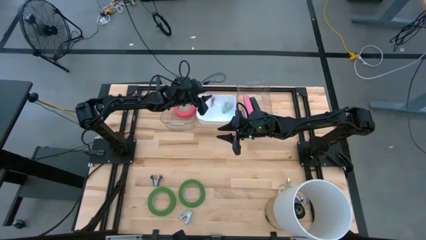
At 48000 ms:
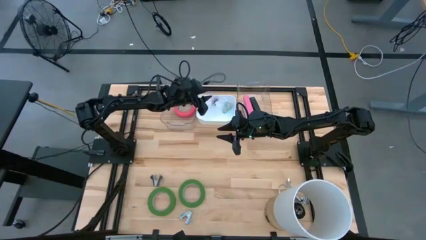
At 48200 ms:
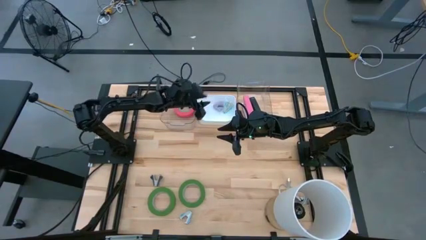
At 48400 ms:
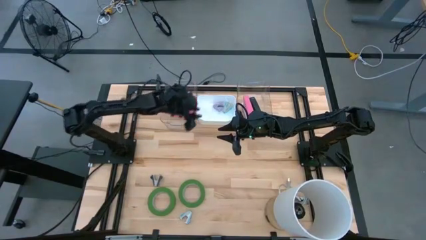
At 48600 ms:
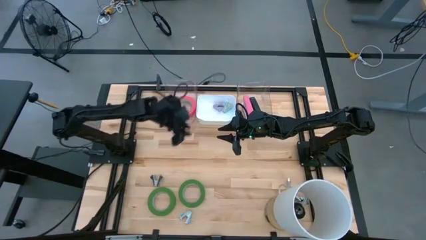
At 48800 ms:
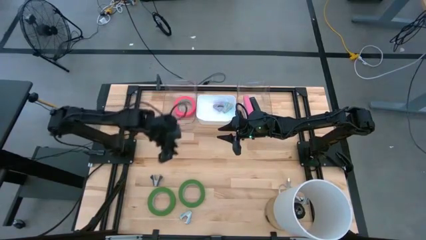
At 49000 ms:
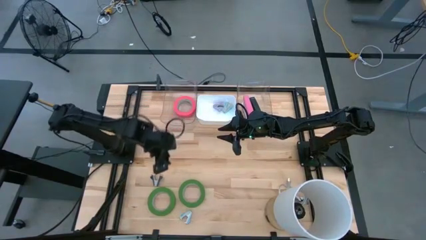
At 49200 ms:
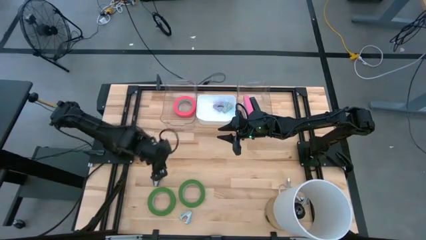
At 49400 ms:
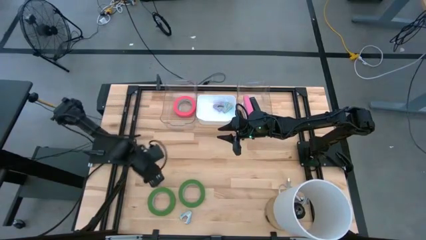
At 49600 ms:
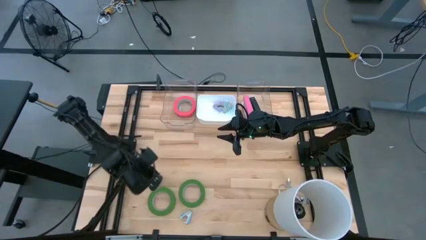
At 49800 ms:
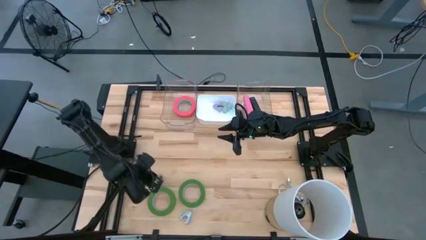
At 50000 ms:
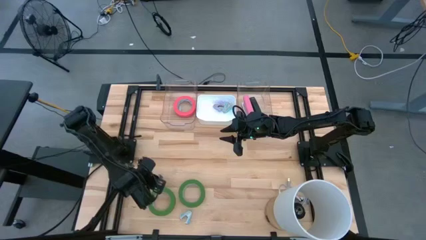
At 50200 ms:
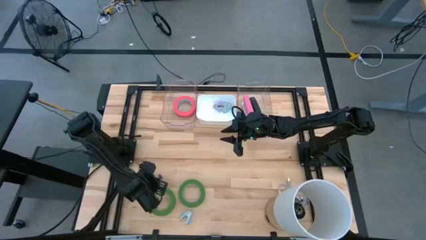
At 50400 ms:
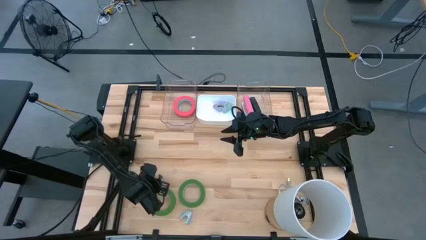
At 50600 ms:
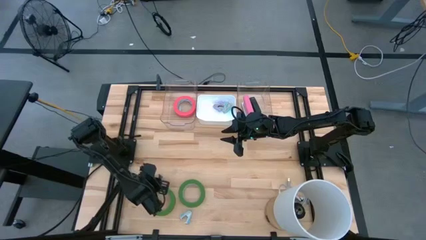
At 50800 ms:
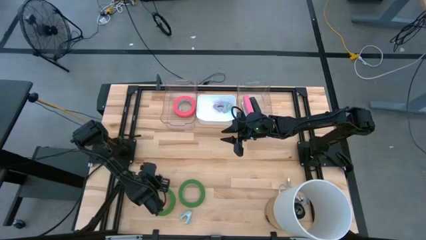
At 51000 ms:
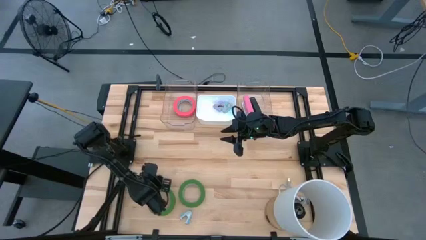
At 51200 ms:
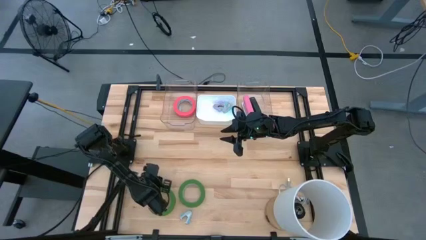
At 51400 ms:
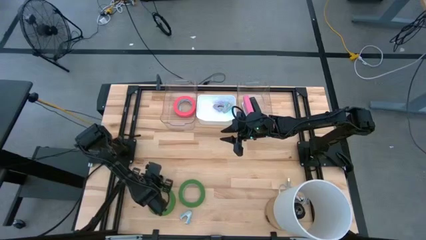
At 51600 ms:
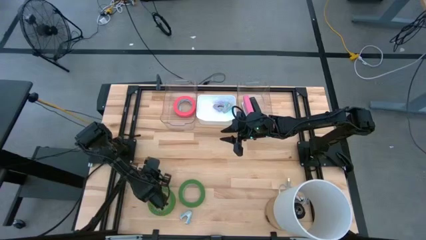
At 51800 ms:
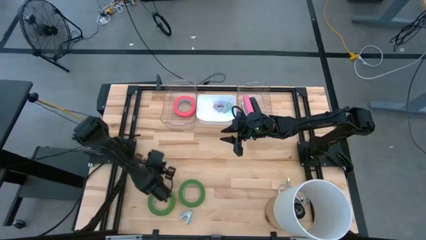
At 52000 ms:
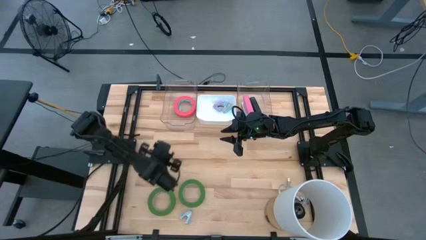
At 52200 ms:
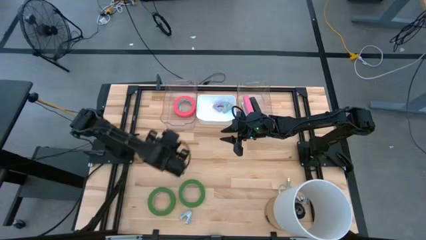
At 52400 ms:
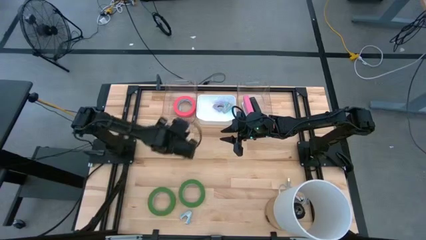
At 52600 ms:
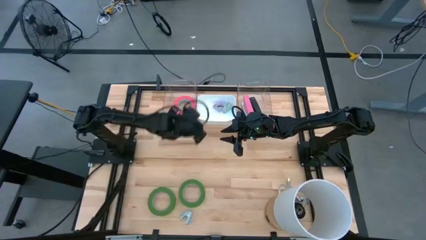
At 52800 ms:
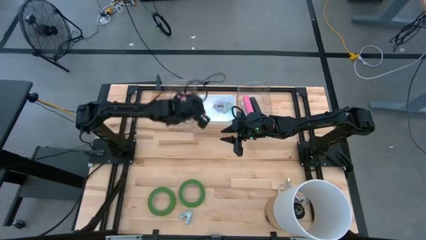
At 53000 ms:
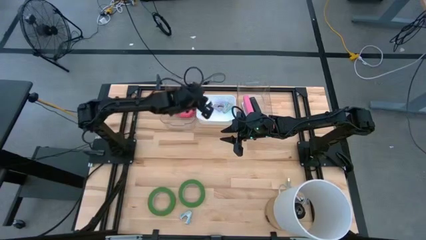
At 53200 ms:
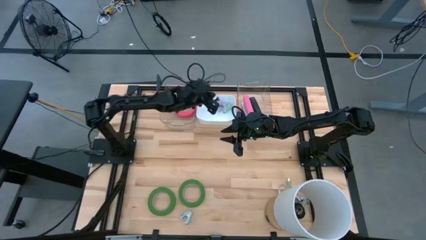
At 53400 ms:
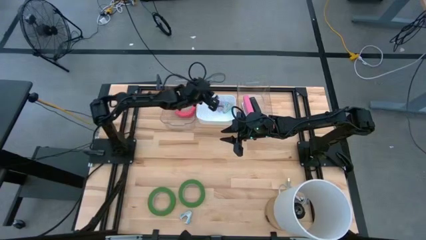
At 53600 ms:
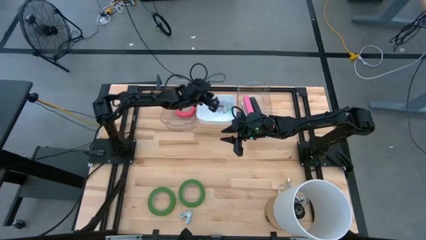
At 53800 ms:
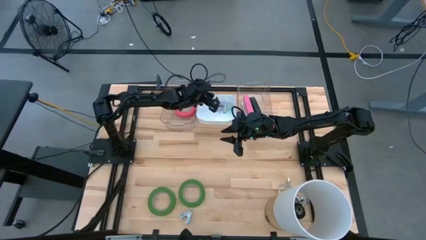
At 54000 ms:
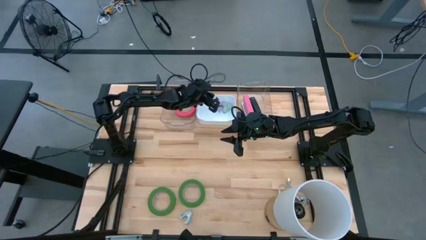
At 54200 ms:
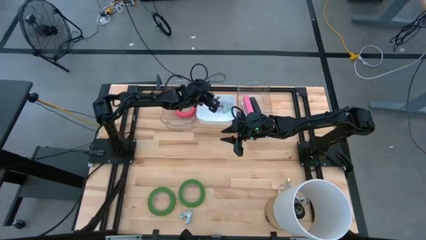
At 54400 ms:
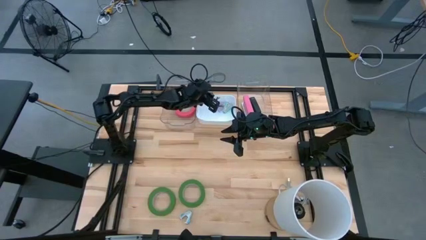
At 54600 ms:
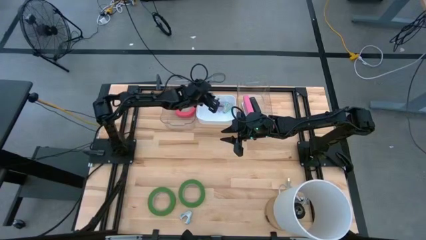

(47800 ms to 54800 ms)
Task: Pick and place Stapler, Stapler remover, tape
Put the black staple remover into the white bin

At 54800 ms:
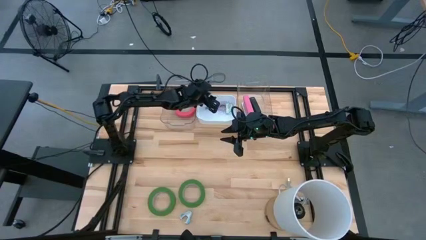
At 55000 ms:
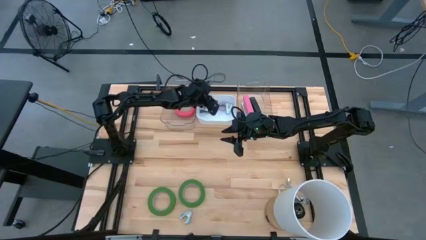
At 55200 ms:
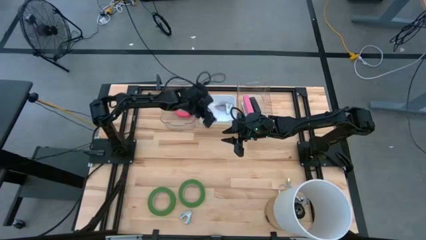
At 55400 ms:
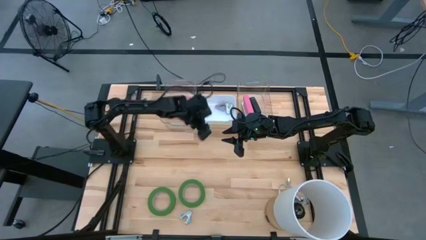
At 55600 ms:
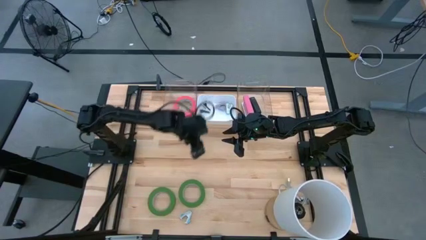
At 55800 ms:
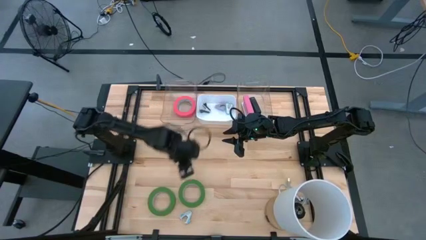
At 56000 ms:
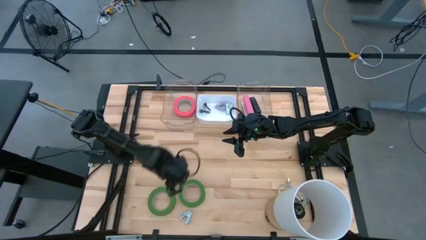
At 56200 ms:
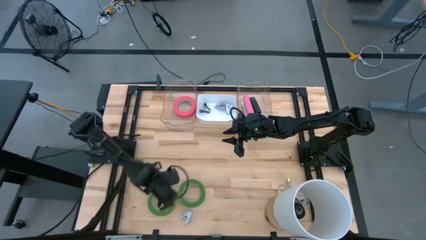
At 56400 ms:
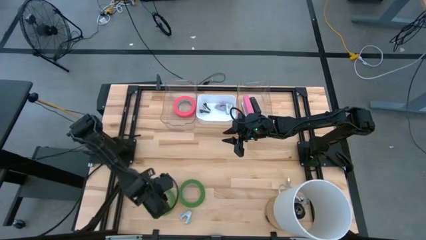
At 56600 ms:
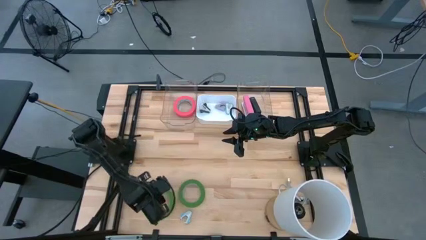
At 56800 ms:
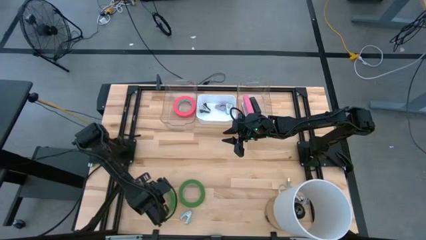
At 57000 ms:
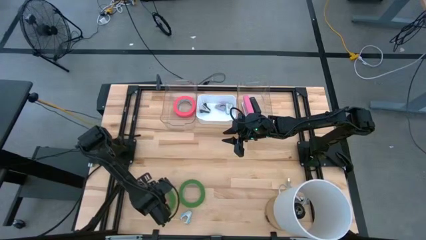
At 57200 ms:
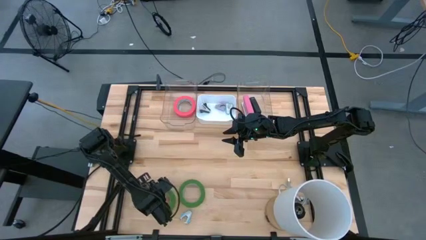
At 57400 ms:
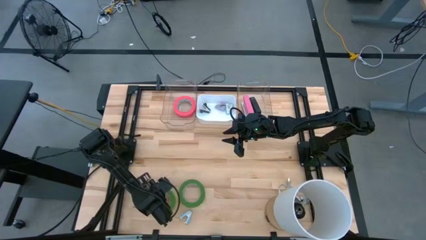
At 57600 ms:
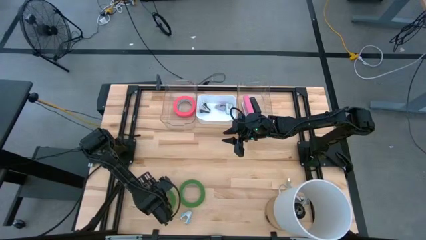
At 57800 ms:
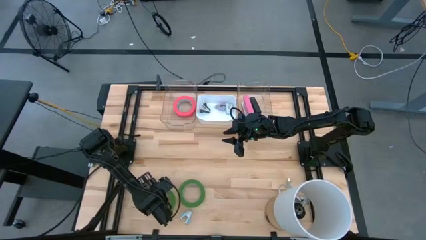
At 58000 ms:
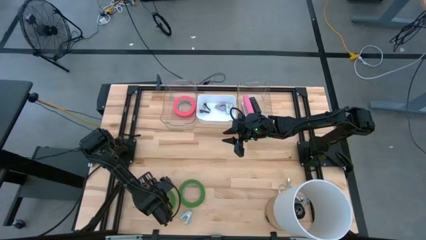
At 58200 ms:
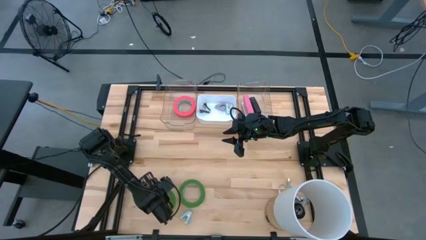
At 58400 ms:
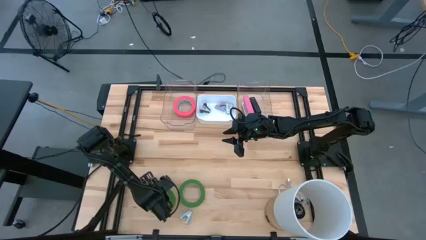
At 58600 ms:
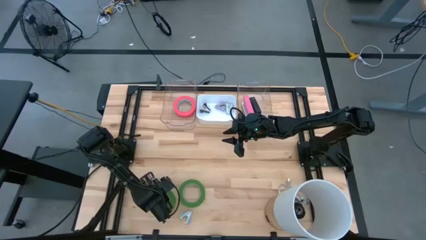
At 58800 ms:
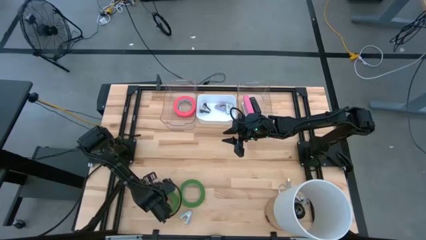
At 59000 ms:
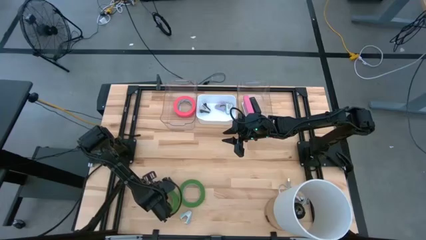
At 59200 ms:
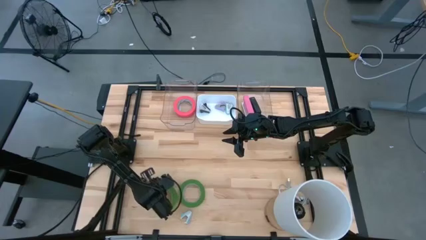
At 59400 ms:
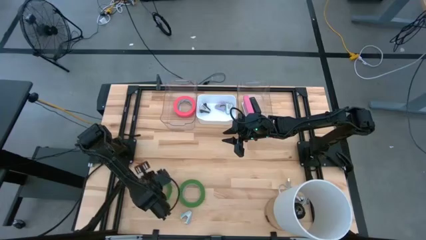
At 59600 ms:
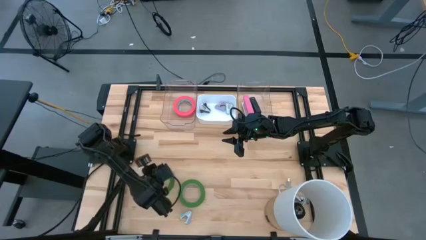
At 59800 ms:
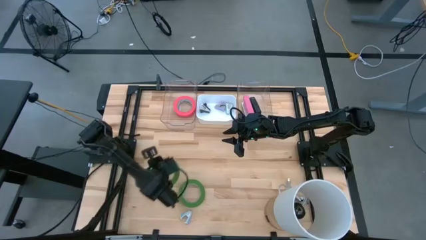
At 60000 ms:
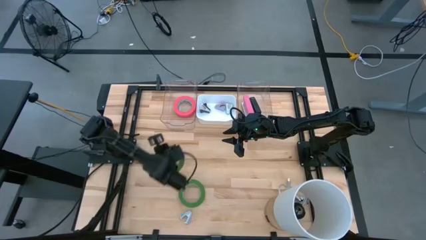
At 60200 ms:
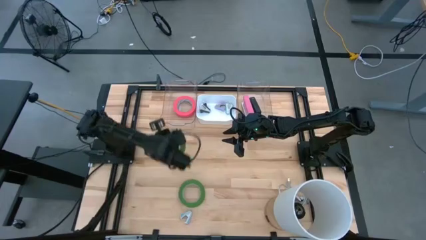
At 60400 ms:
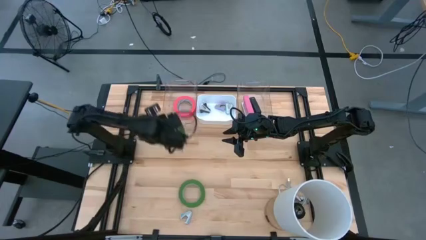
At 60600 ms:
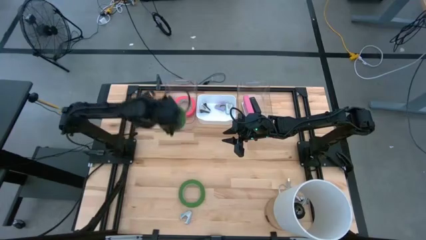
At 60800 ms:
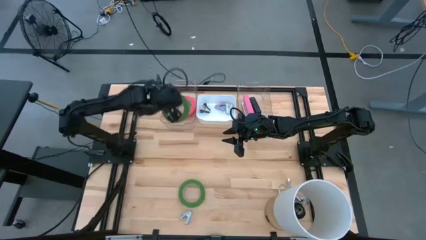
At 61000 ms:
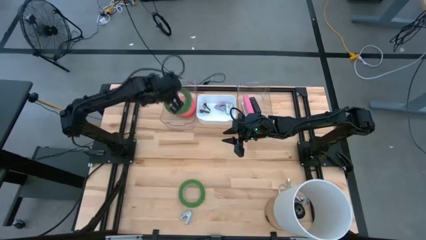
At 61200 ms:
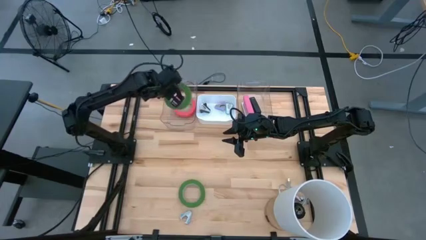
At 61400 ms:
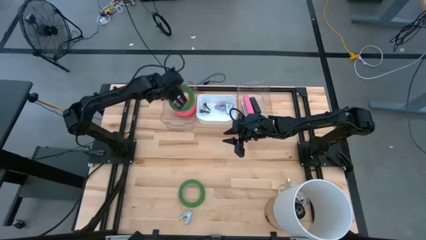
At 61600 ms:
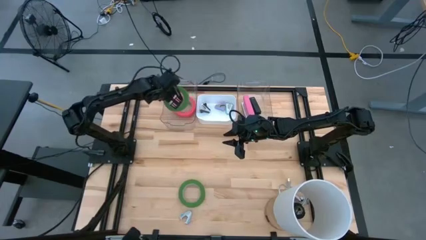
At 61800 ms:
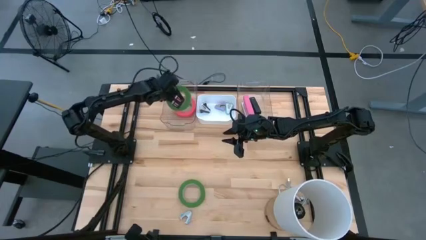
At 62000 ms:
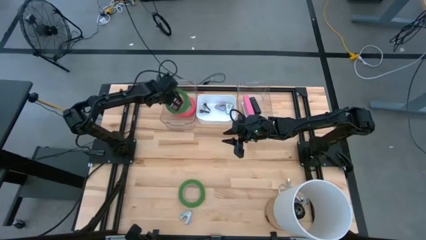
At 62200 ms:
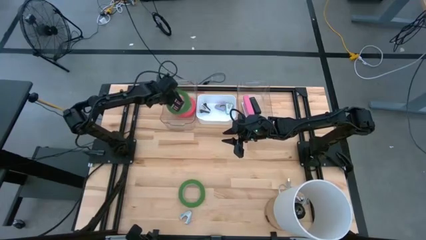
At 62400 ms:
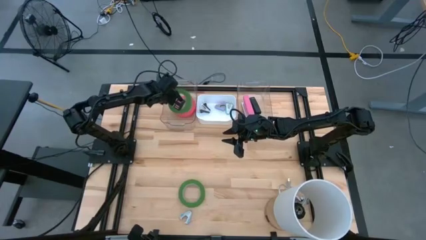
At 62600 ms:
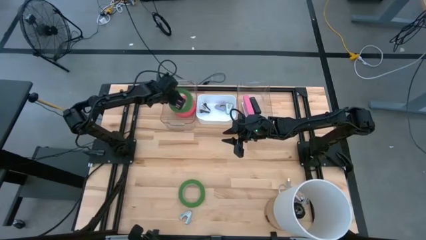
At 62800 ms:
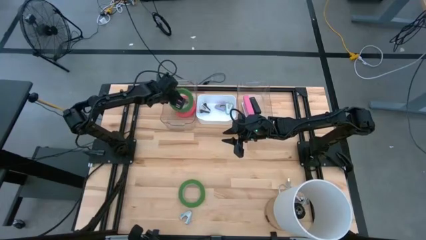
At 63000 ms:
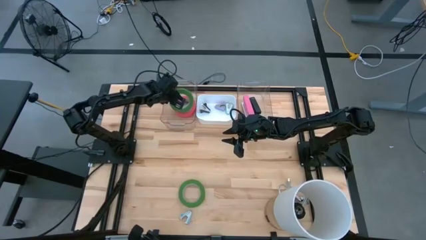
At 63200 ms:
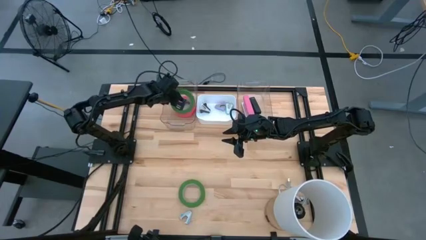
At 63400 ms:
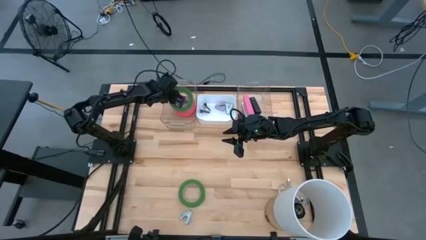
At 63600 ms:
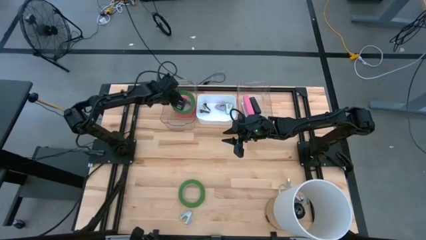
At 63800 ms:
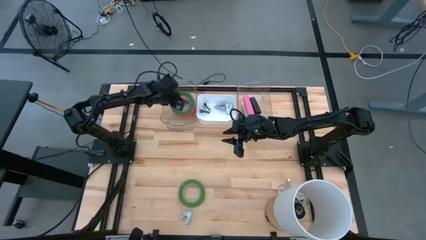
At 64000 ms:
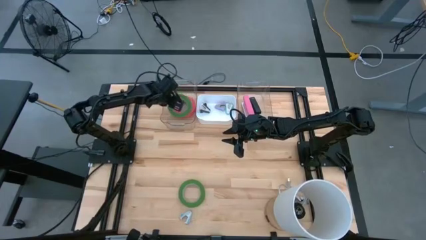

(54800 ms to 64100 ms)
Put the left light green masking tape into the left transparent bin
